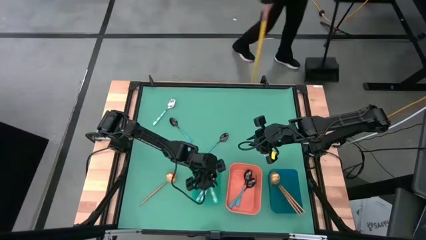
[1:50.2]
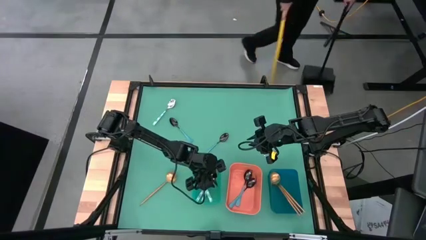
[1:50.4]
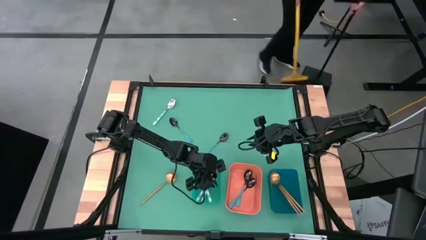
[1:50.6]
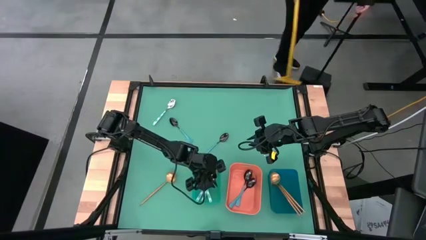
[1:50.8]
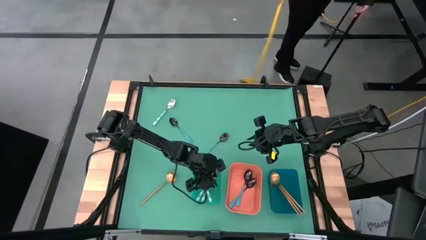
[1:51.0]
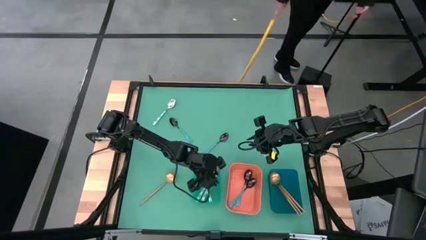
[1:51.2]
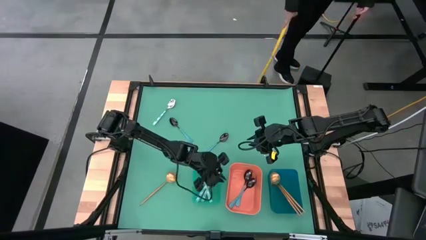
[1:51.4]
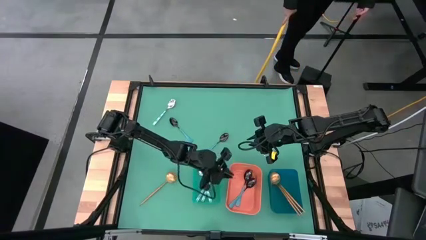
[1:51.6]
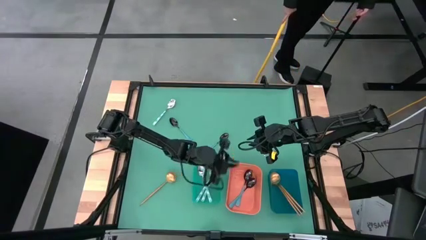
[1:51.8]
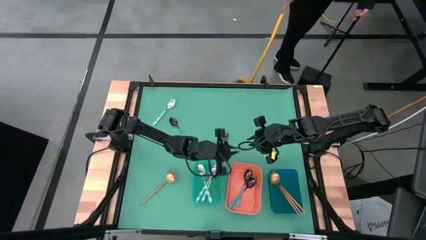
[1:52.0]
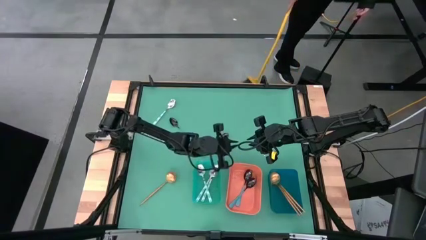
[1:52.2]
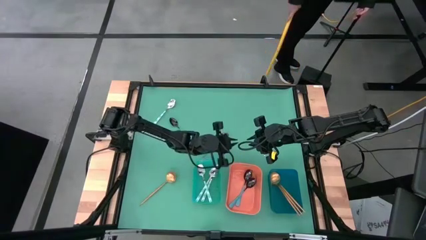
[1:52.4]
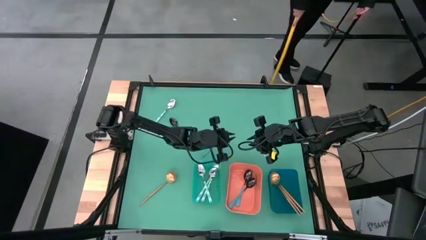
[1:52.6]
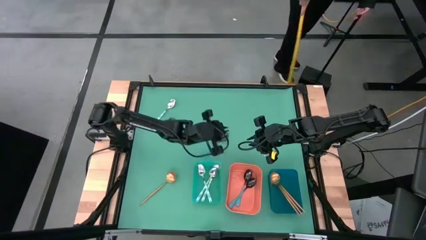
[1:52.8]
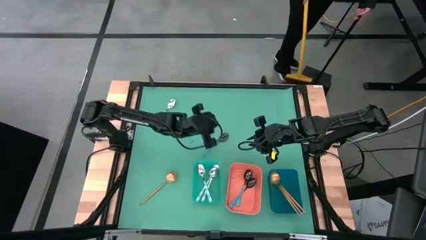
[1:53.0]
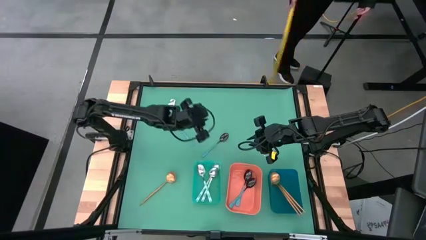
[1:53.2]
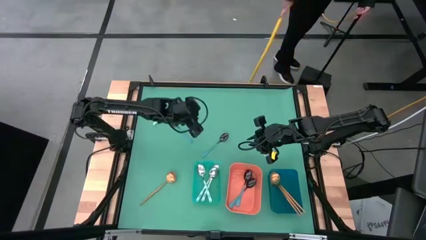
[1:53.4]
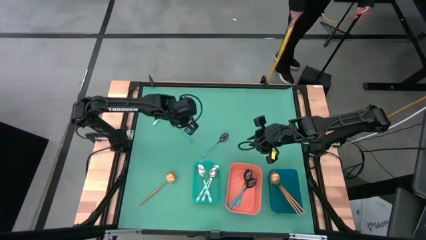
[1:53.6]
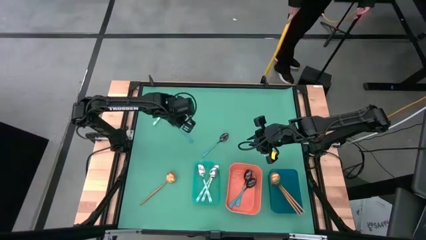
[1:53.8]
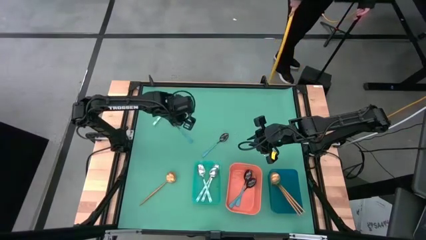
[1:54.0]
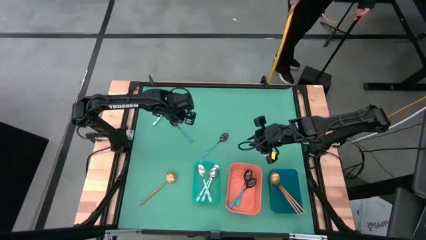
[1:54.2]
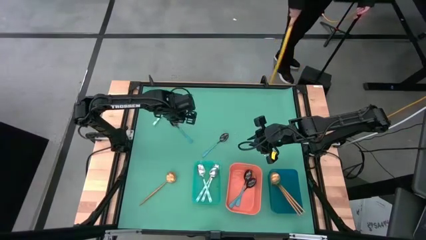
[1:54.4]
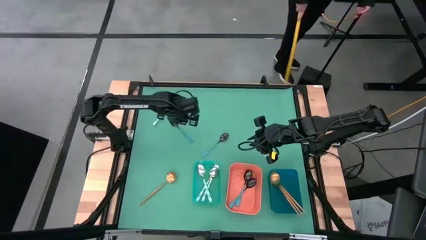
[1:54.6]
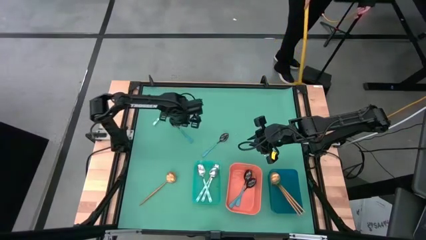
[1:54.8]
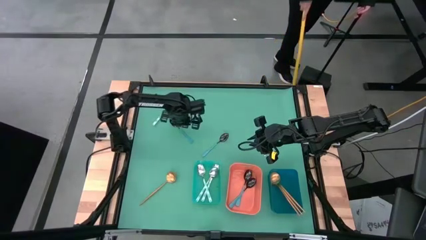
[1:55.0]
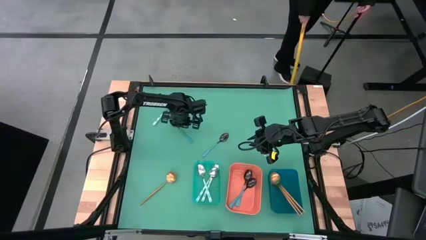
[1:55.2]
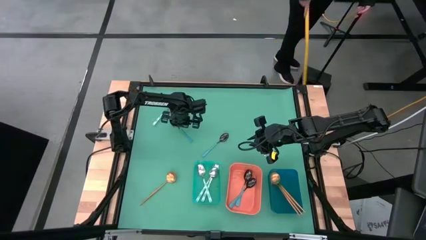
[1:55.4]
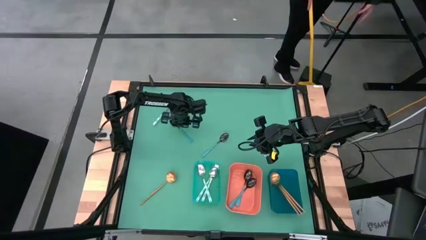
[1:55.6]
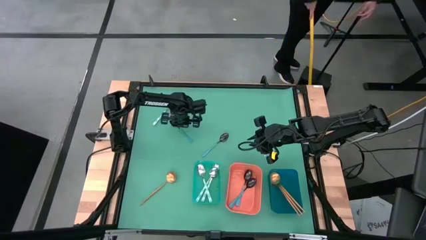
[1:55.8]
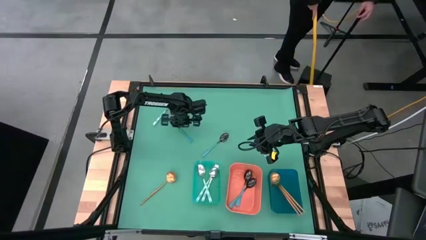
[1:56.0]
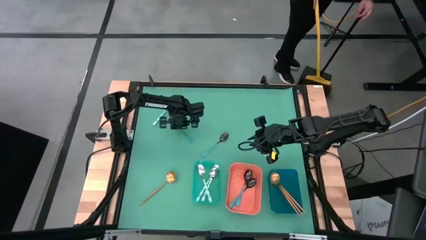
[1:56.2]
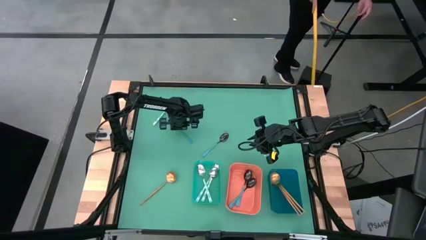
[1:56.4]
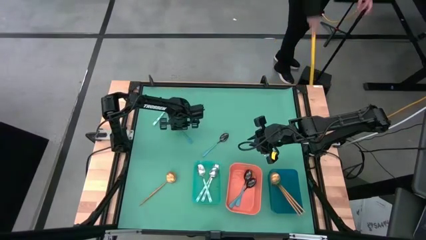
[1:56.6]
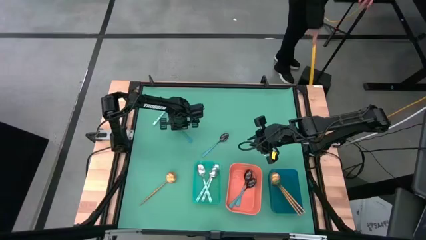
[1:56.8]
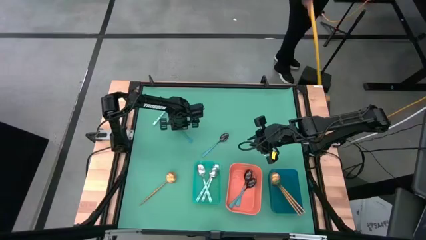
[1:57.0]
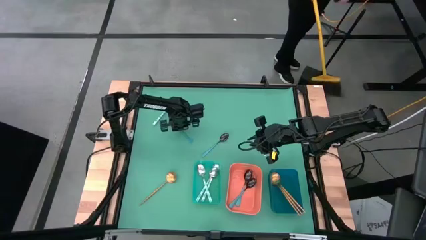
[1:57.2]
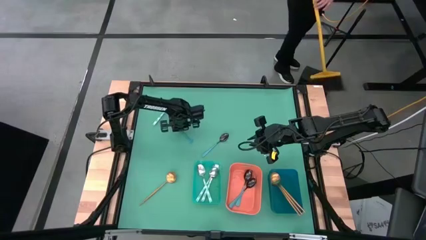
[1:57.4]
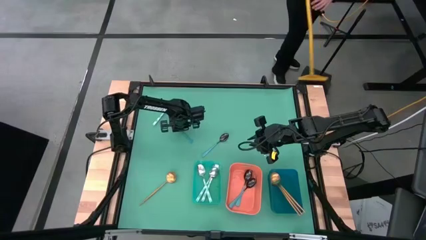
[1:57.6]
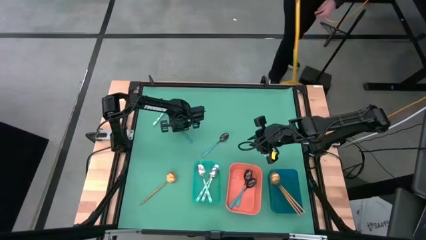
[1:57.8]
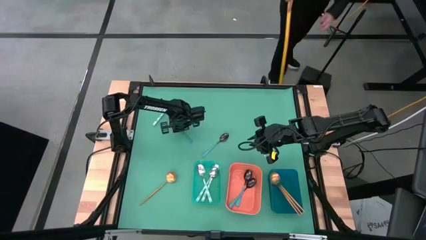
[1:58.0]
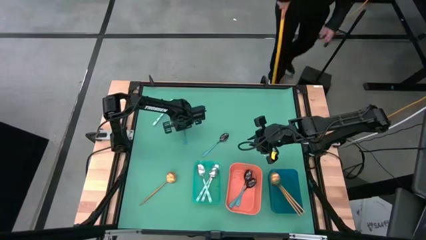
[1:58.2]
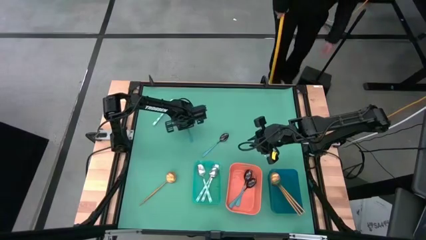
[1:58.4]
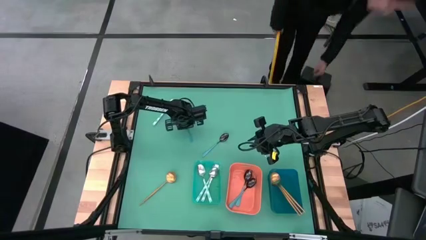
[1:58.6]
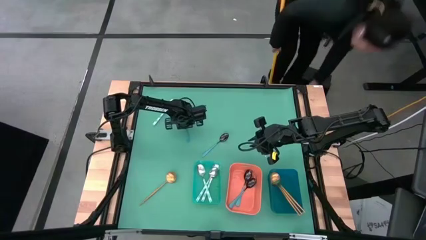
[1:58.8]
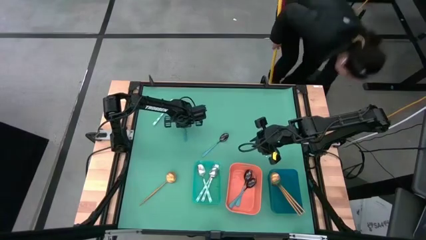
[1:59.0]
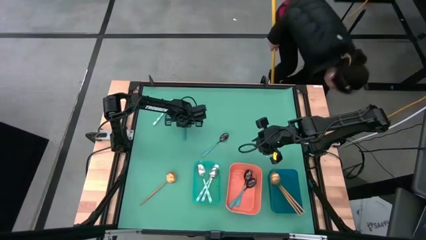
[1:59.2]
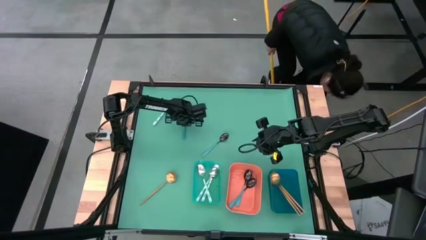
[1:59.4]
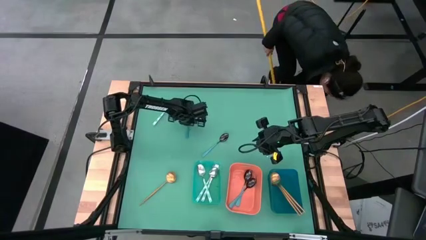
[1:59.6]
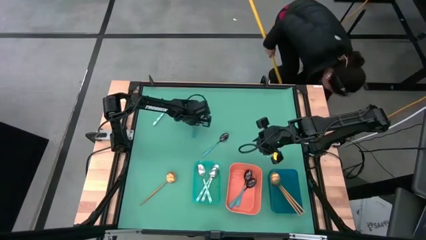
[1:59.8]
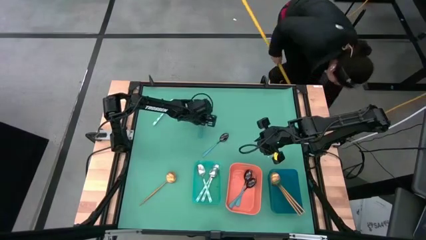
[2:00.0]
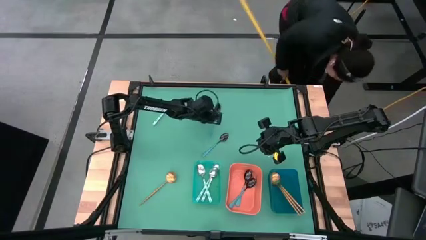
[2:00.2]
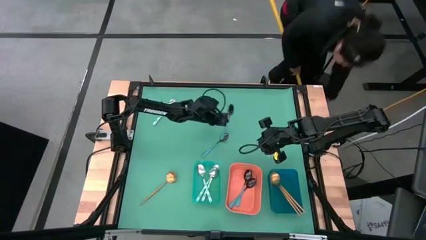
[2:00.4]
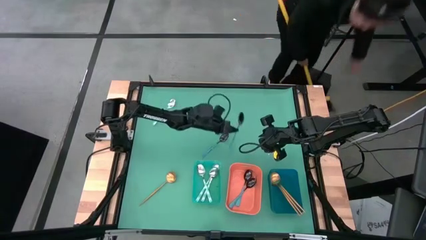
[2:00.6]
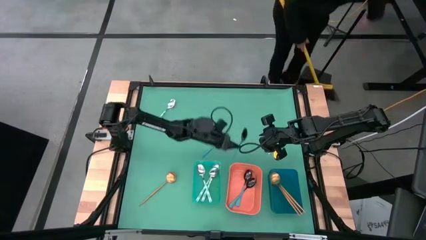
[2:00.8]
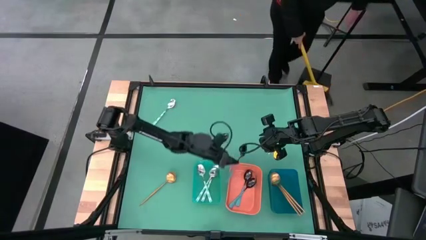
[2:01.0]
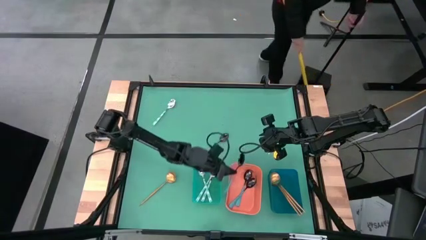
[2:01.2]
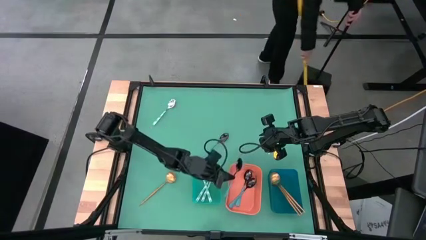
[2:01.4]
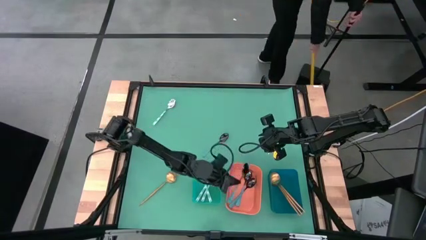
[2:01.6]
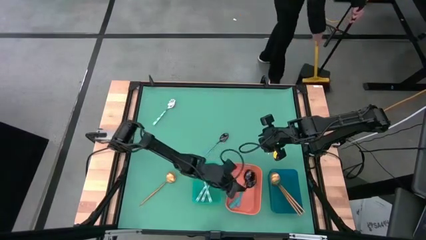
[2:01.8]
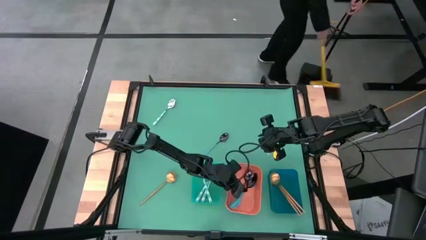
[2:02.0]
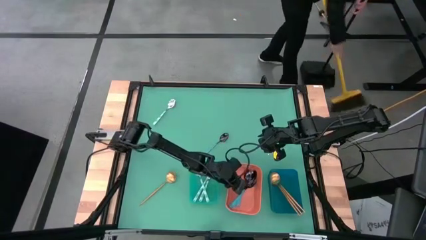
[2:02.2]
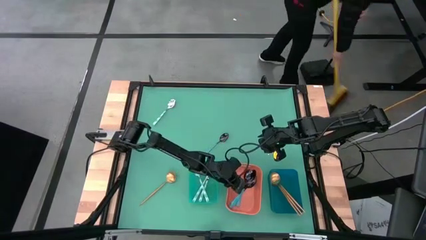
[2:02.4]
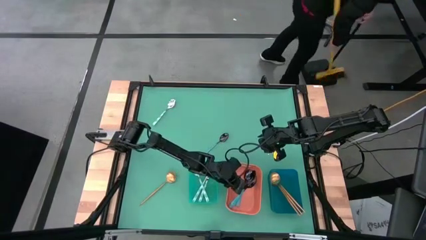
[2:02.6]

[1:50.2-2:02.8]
Task: Sort silverware by color (type)
Put the blue spoon into the orange bin
